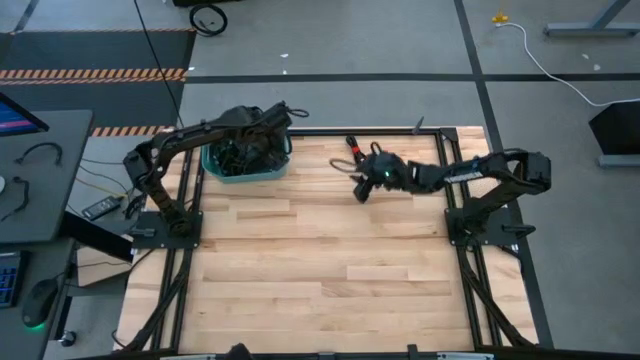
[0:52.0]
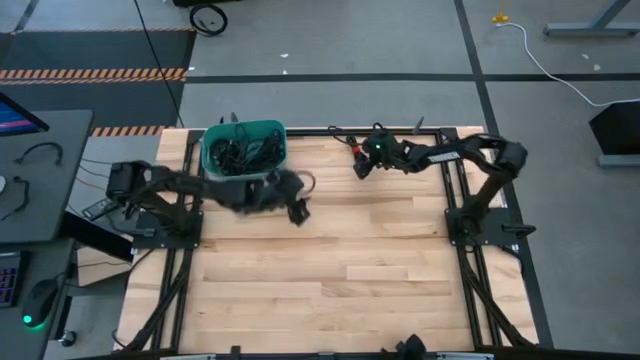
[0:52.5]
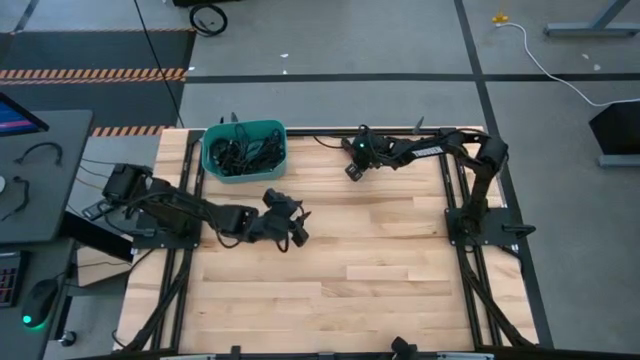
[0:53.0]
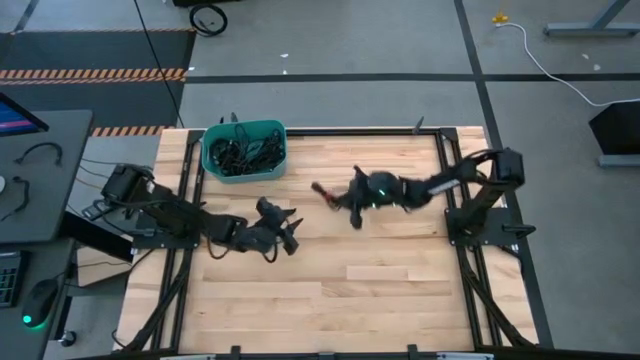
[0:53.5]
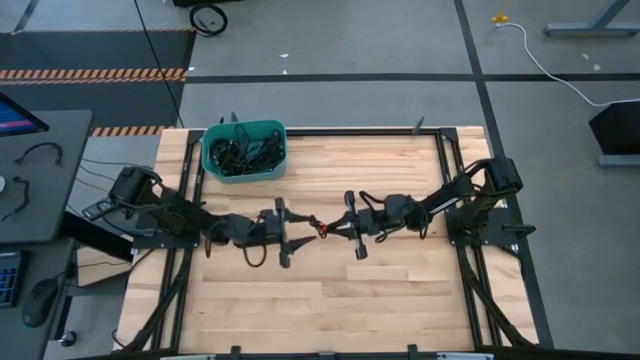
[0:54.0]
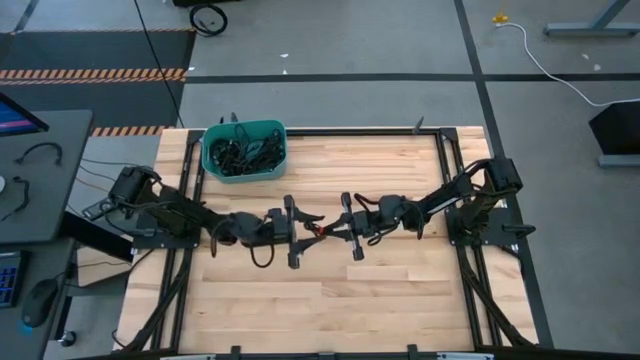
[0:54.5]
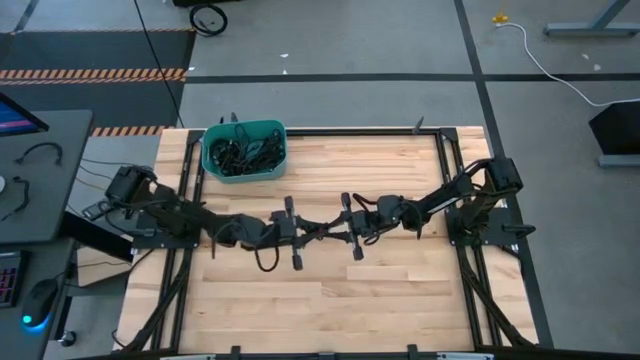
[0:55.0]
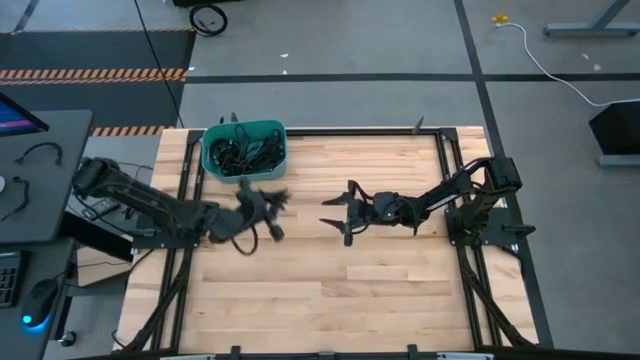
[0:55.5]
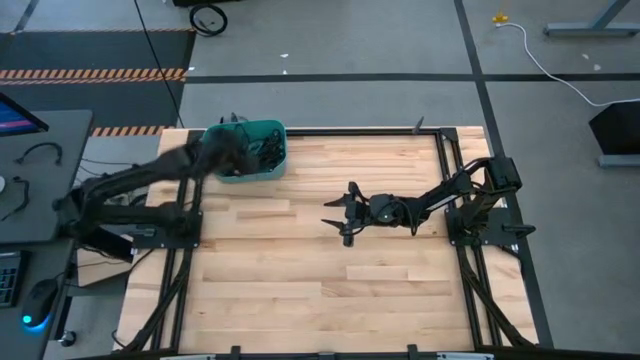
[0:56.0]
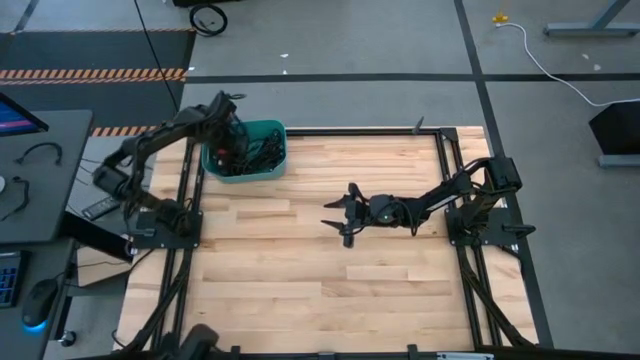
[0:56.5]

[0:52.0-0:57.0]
Task: Pick and place USB-C Cables
Put the black charger cable into the blue bin

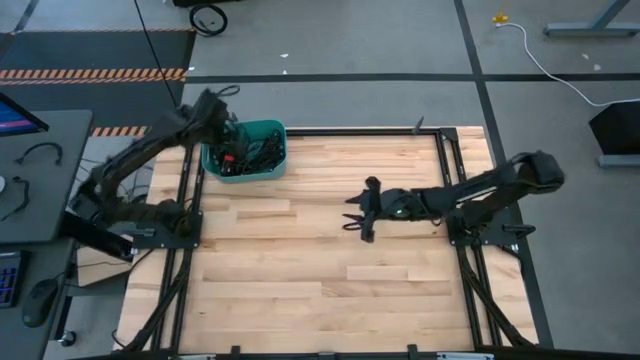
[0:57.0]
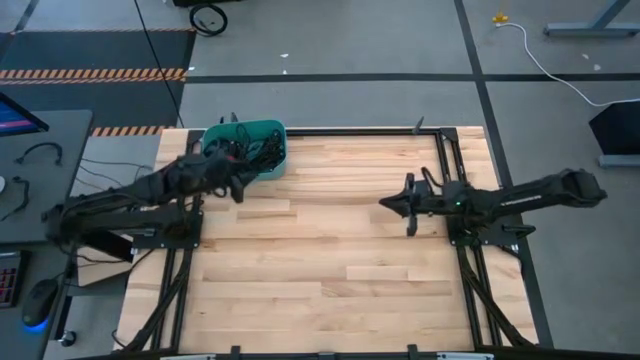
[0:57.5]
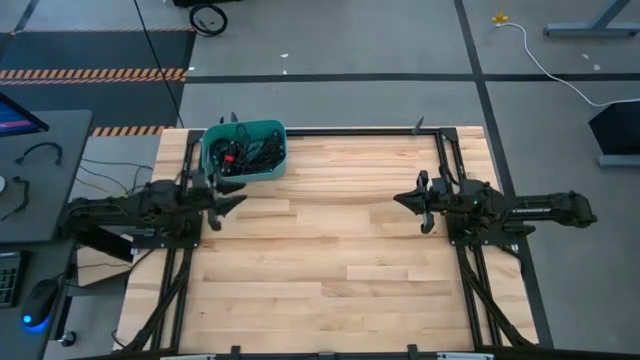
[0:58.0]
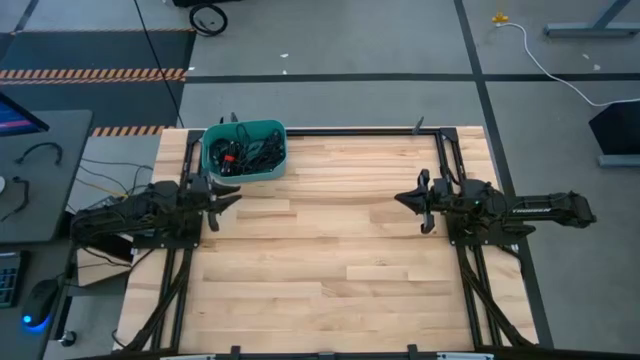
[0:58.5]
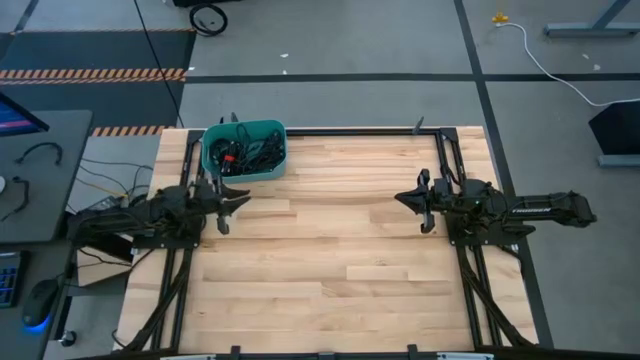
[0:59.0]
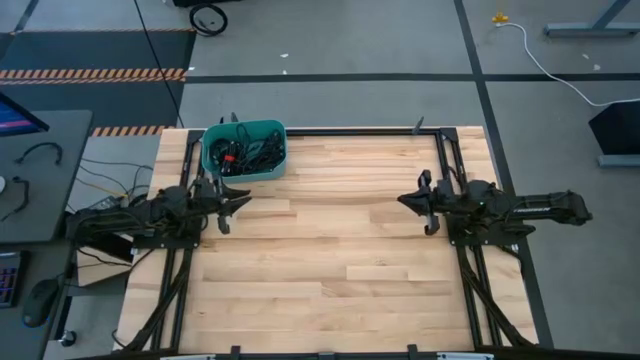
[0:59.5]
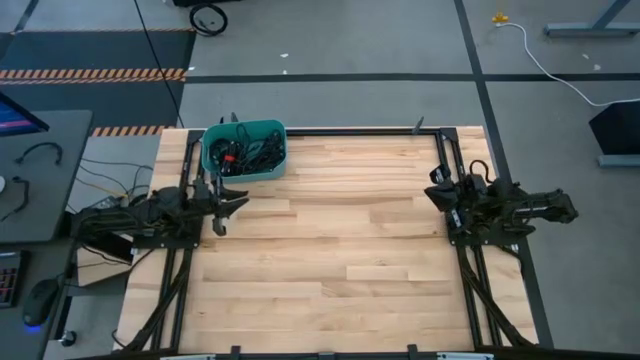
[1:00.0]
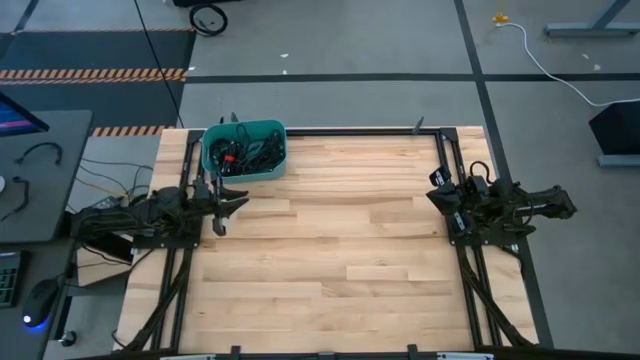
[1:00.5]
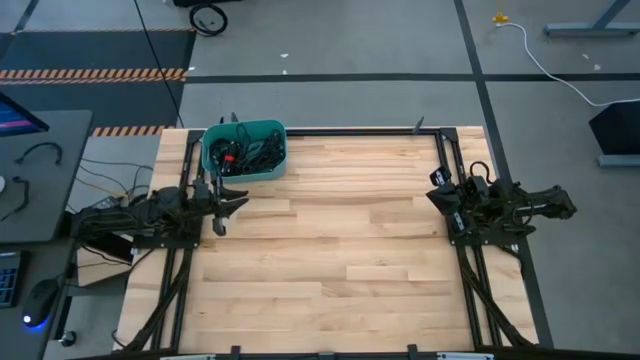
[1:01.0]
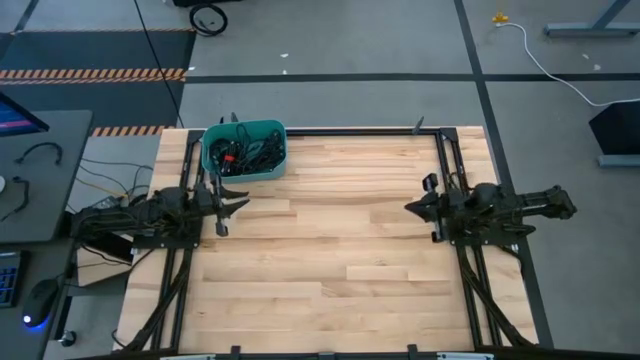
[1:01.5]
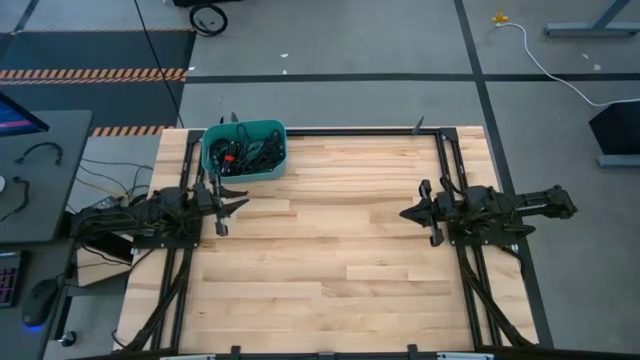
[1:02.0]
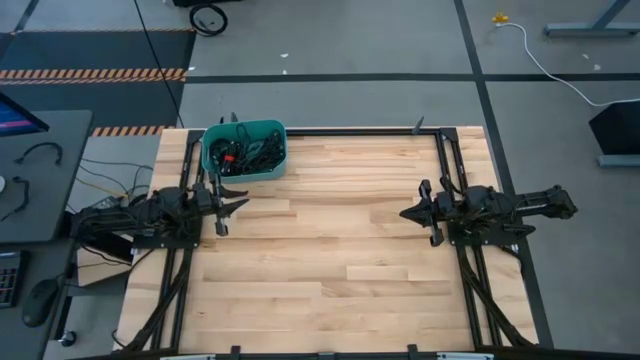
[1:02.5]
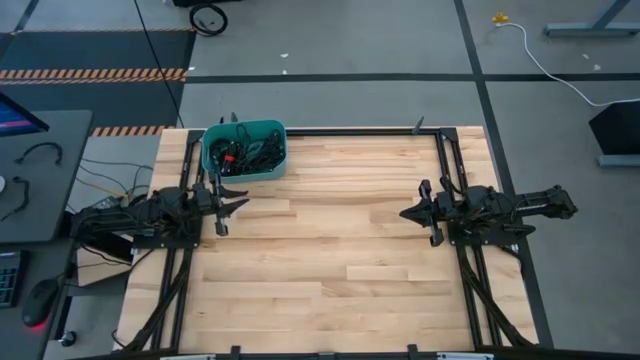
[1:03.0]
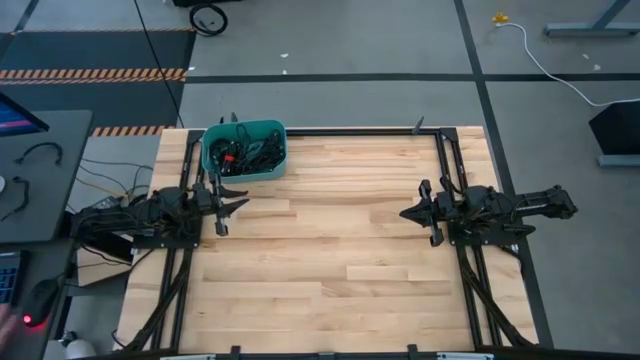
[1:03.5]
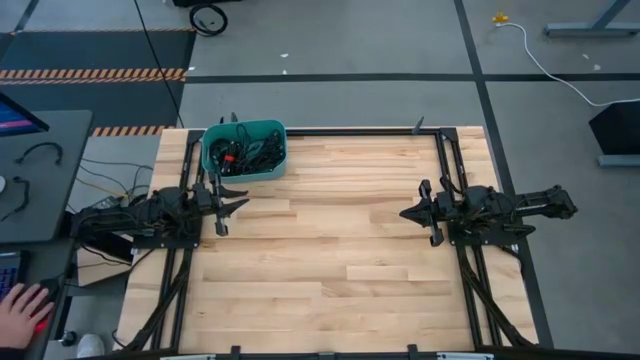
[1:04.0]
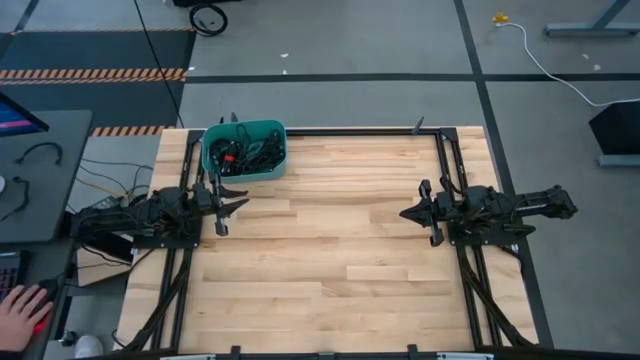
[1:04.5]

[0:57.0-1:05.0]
Return to Home Position

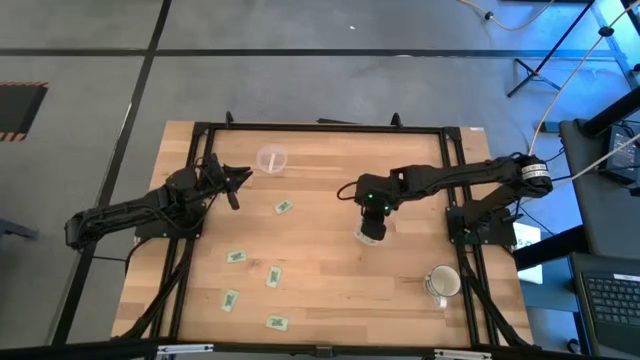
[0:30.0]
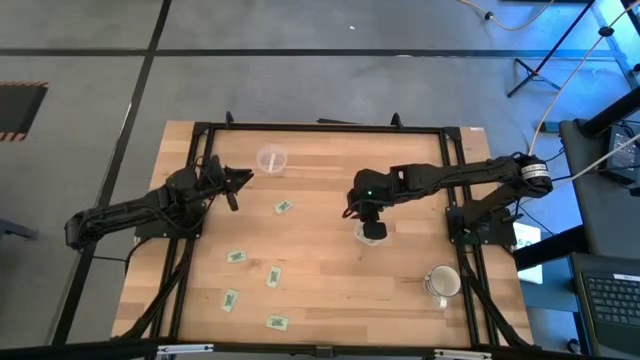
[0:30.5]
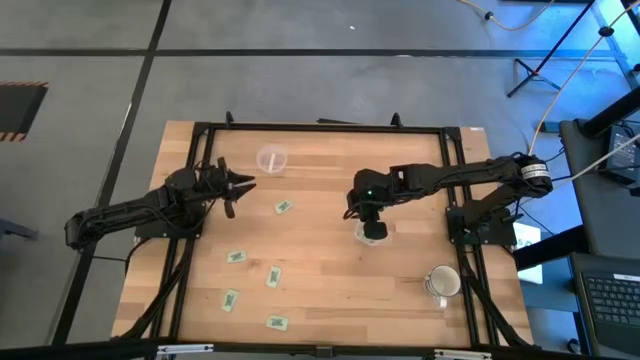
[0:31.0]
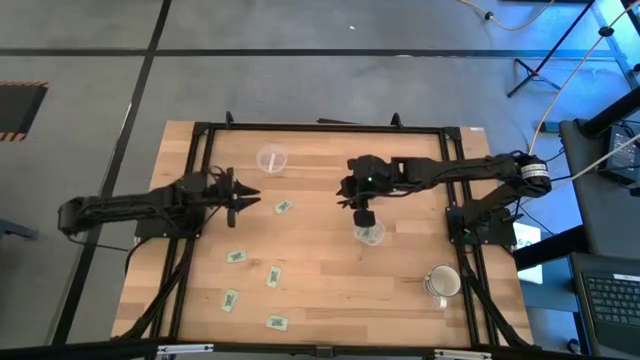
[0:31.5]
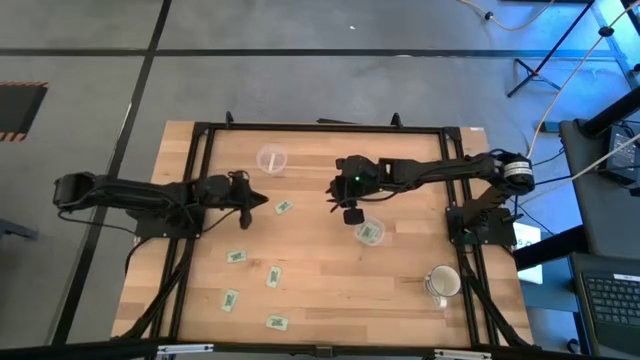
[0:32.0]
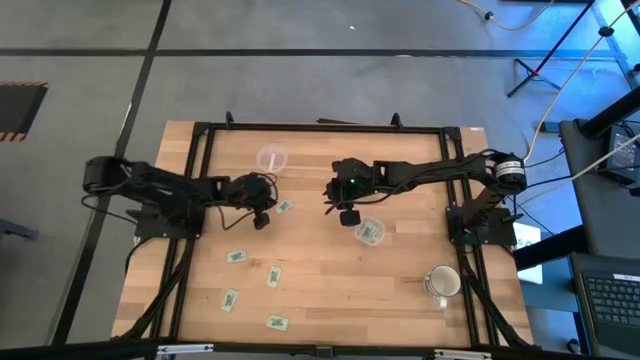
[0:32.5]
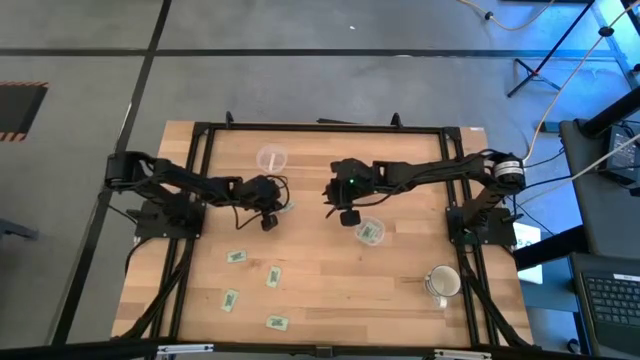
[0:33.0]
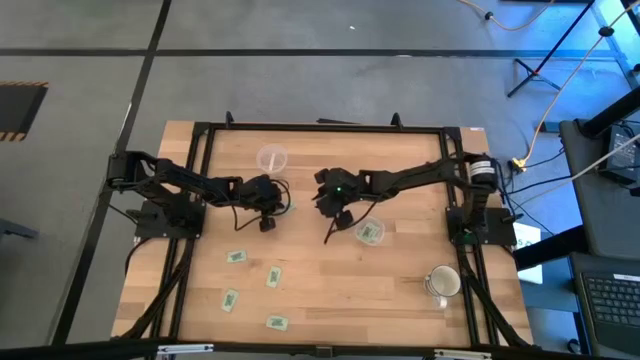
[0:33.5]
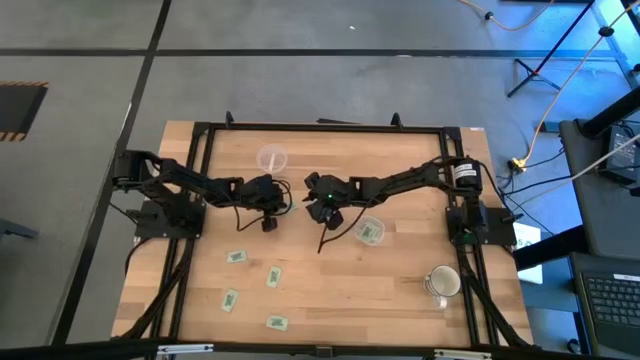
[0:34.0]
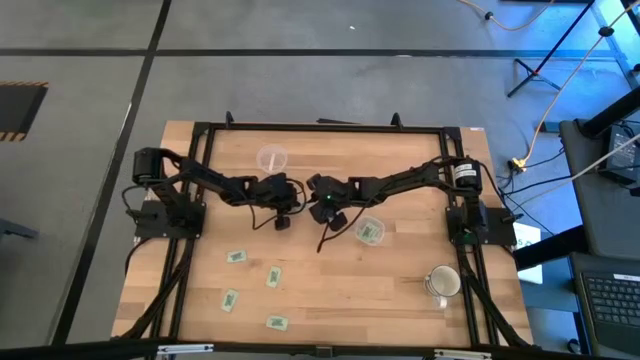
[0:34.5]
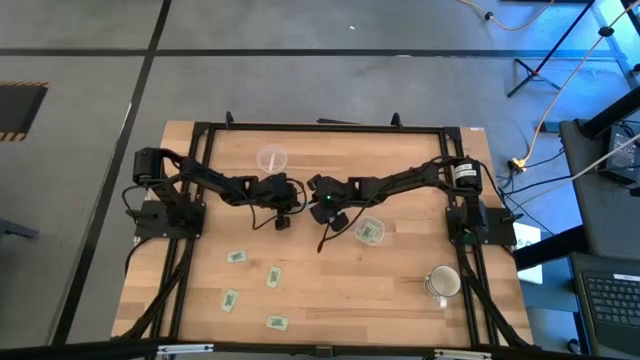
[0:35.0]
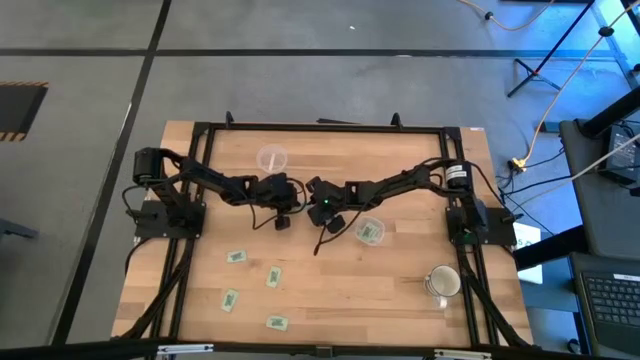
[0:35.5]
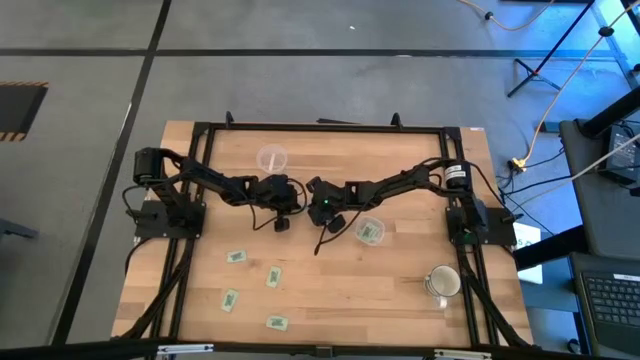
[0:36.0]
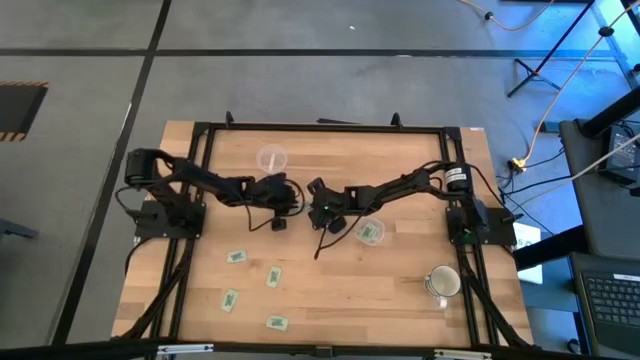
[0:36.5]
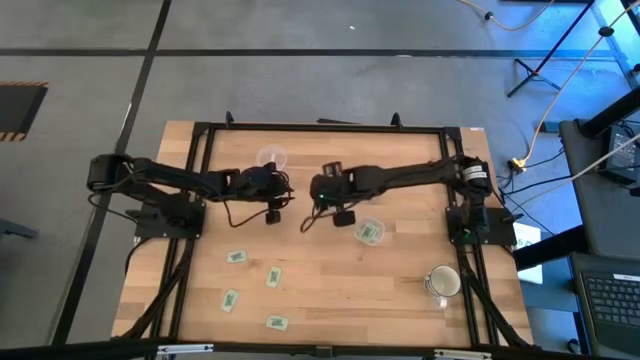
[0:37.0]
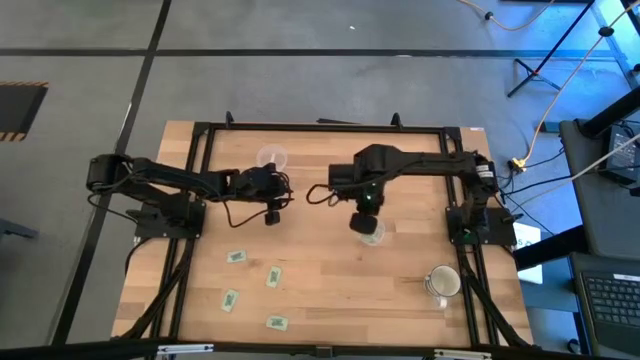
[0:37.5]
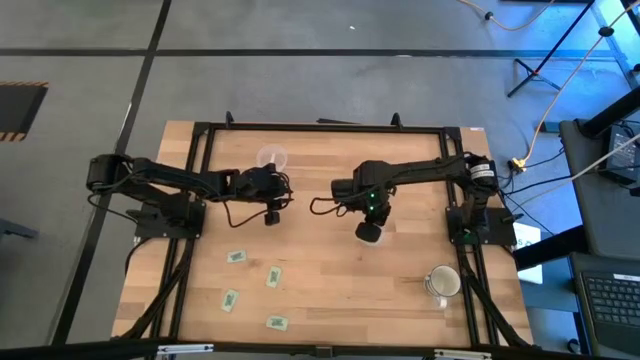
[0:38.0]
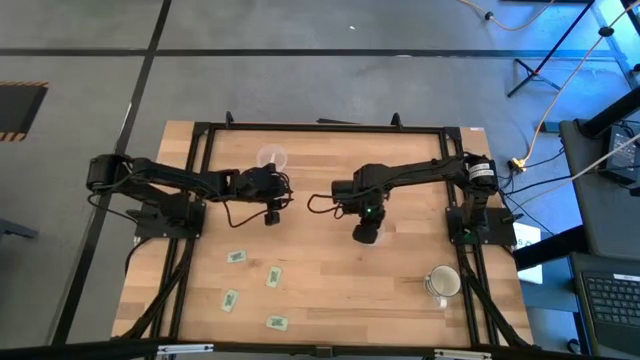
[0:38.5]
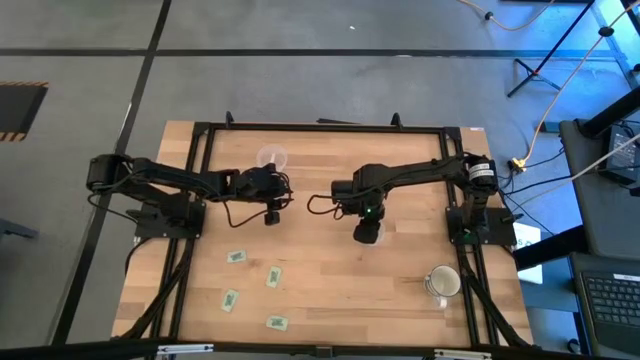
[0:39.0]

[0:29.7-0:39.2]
Task: Pick and place Stevia / Truvia into bins
Put the stevia packet into the bottom transparent container
